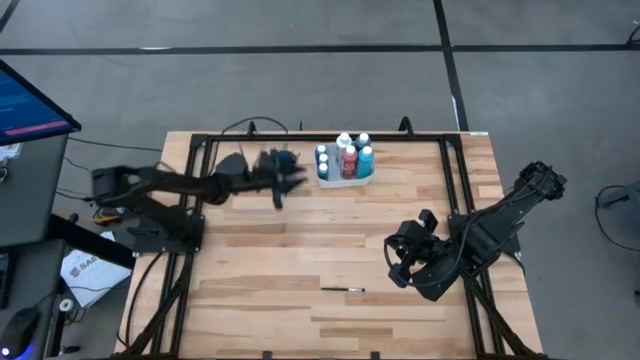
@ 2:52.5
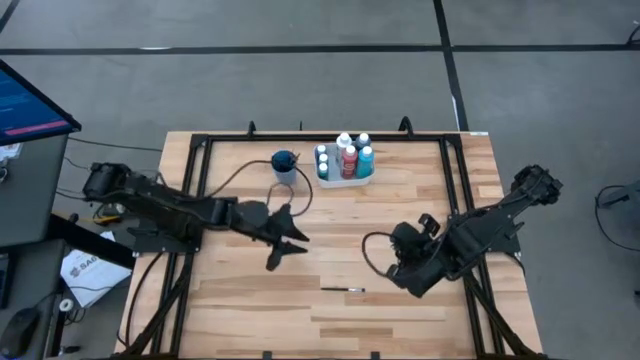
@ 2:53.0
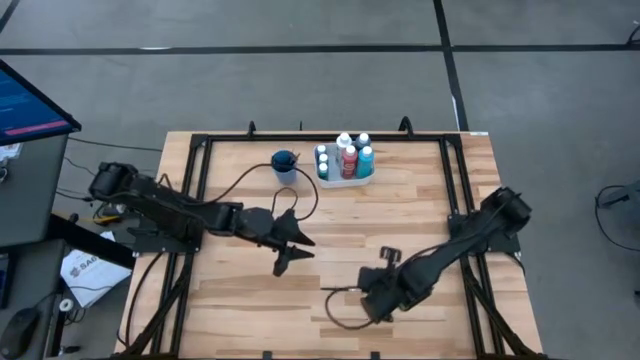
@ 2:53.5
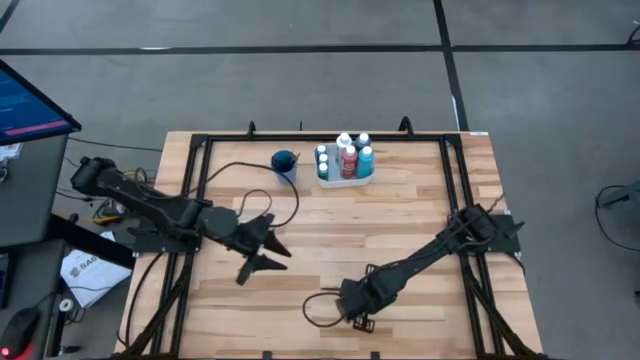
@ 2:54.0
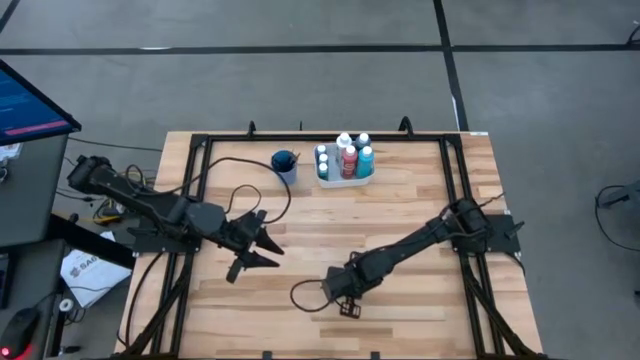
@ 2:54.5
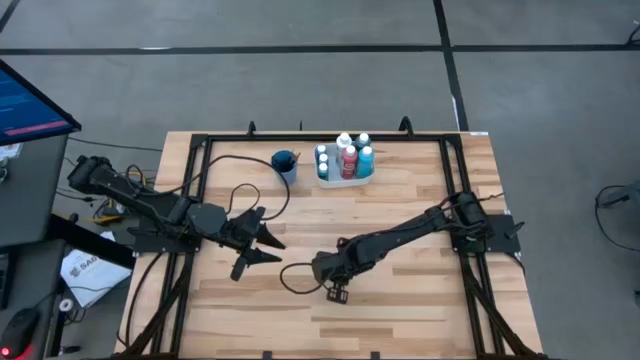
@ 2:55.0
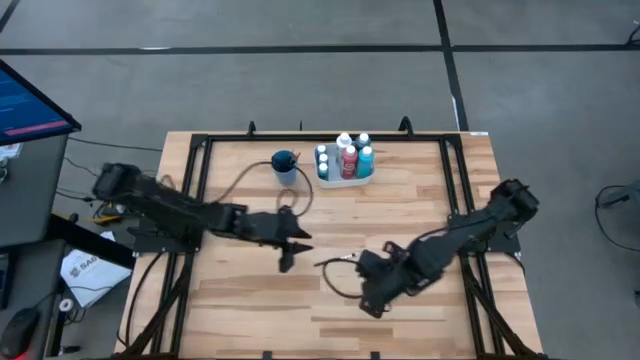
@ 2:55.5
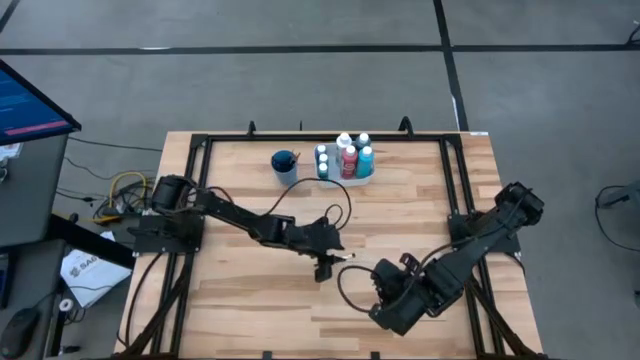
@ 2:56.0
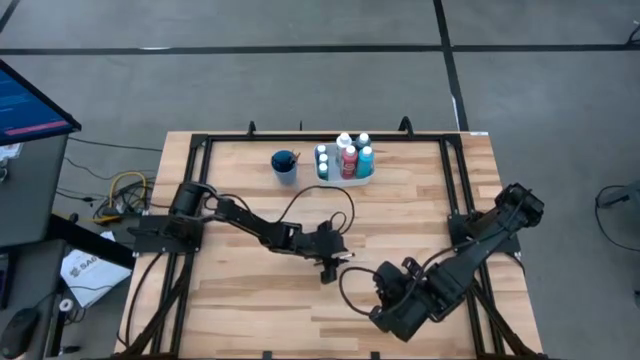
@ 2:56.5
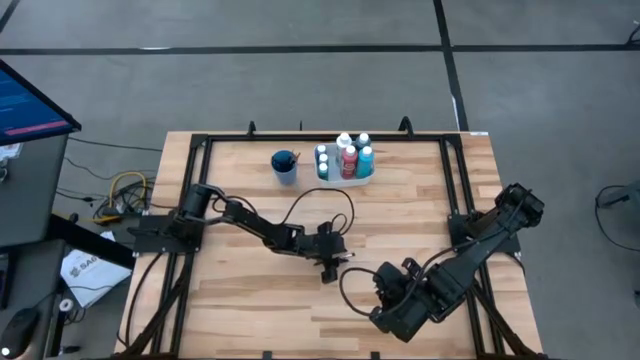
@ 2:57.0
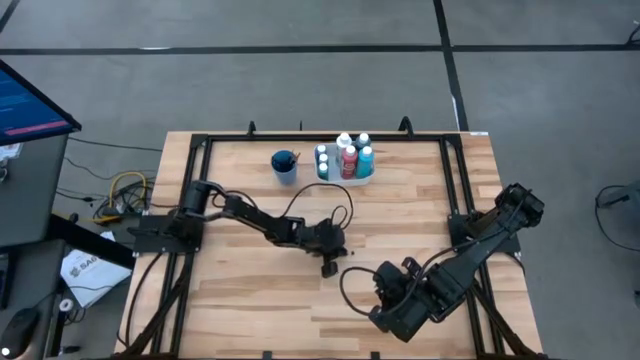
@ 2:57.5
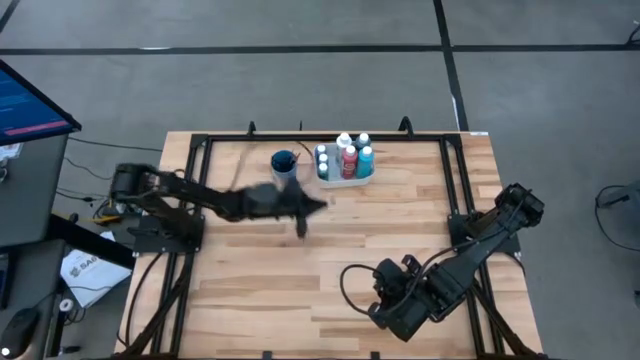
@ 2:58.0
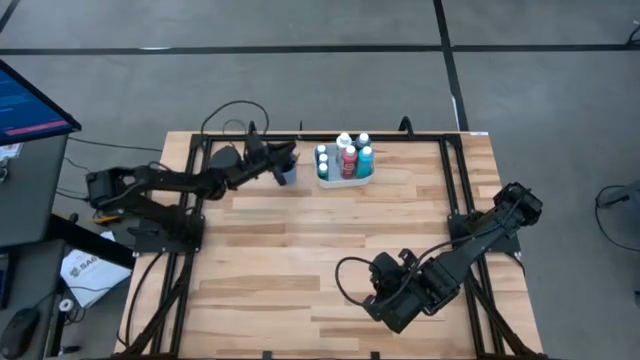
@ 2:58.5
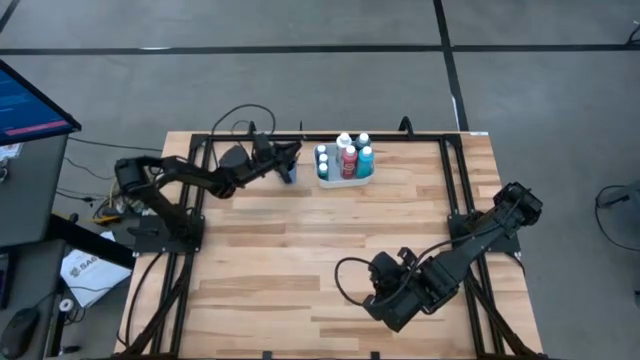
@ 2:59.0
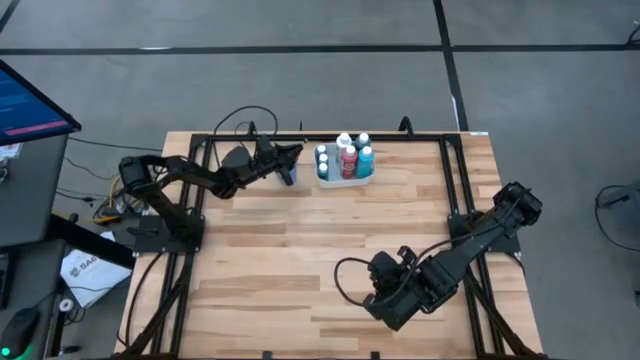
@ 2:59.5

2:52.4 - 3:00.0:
Task: Pick & Place Paint Supplies
Put the silver and black paint brush into the blue cup

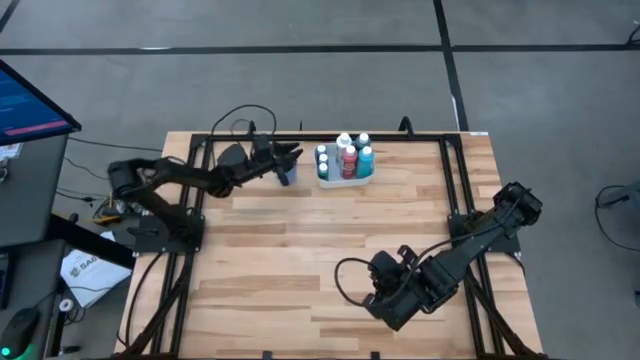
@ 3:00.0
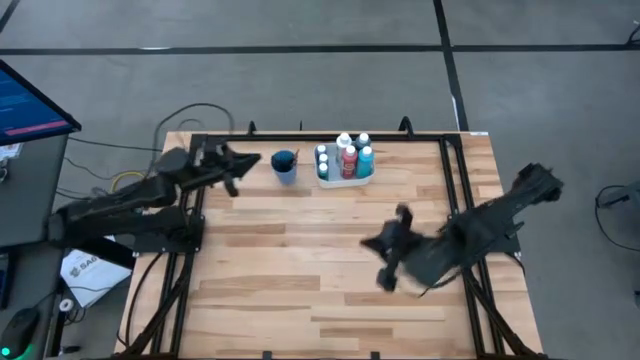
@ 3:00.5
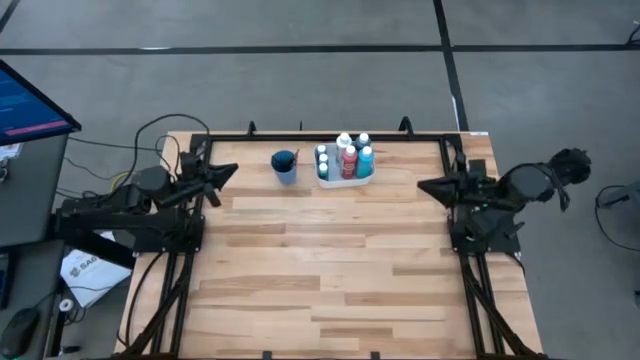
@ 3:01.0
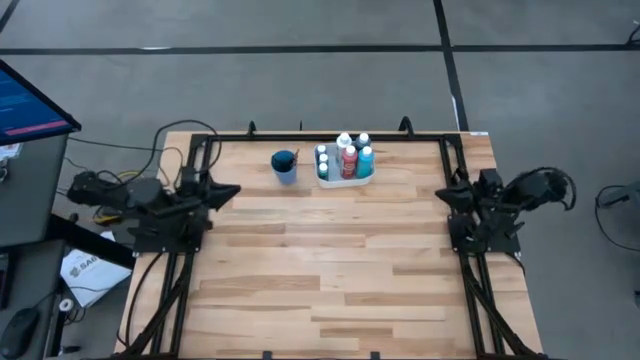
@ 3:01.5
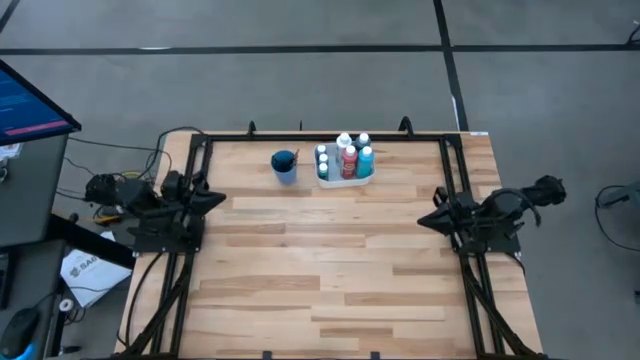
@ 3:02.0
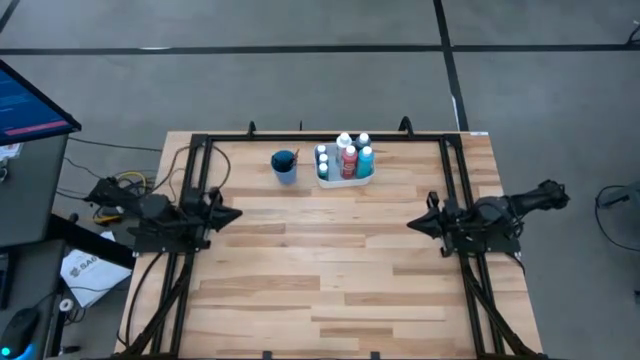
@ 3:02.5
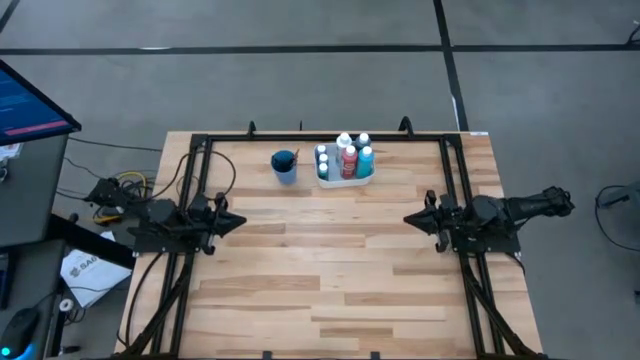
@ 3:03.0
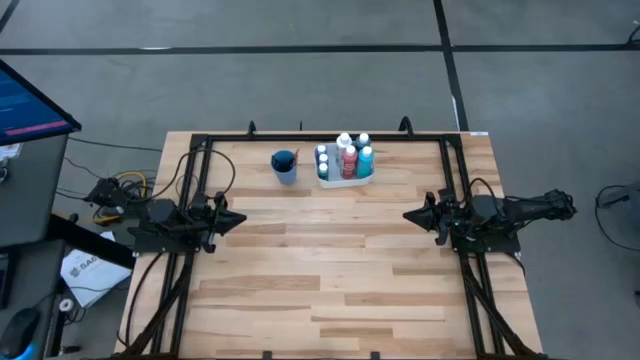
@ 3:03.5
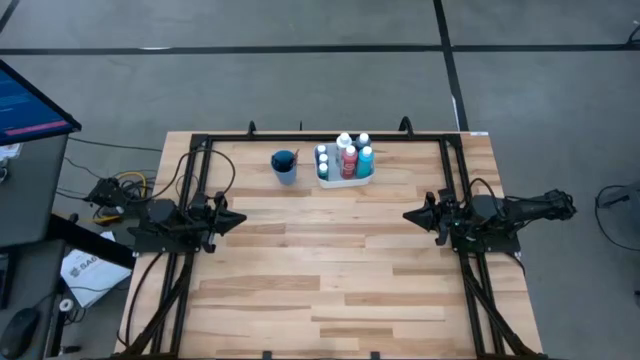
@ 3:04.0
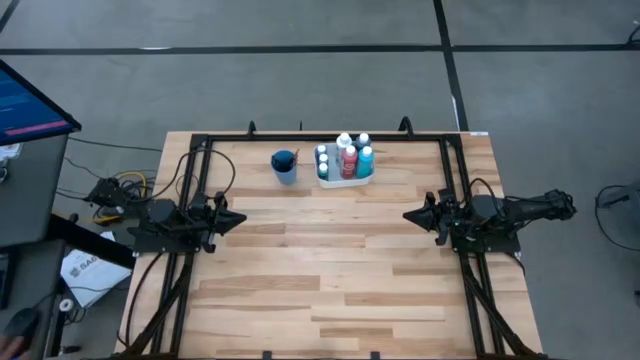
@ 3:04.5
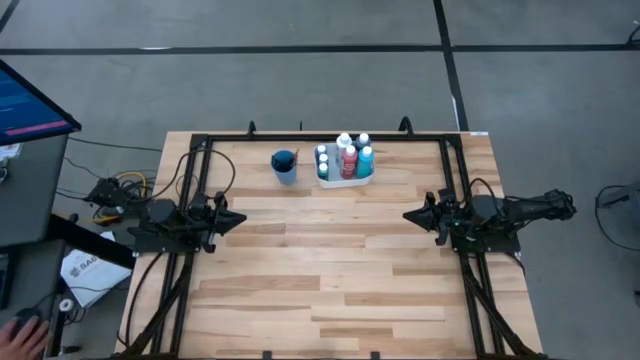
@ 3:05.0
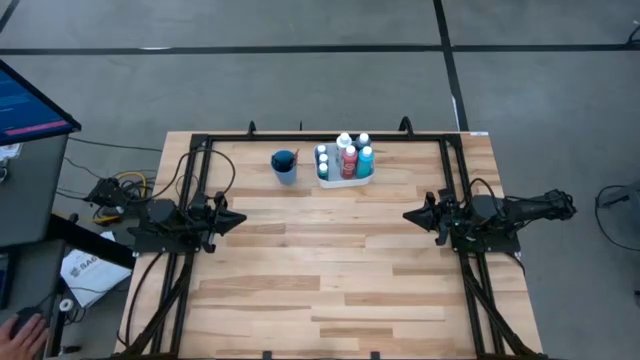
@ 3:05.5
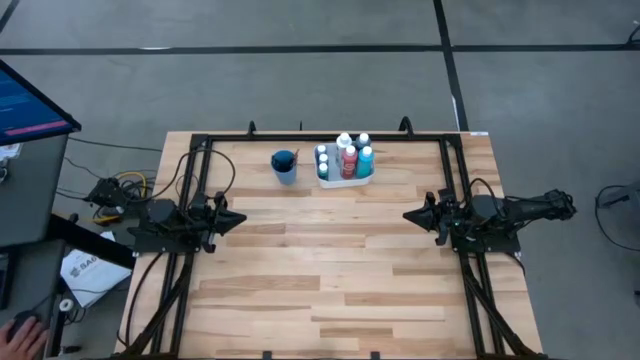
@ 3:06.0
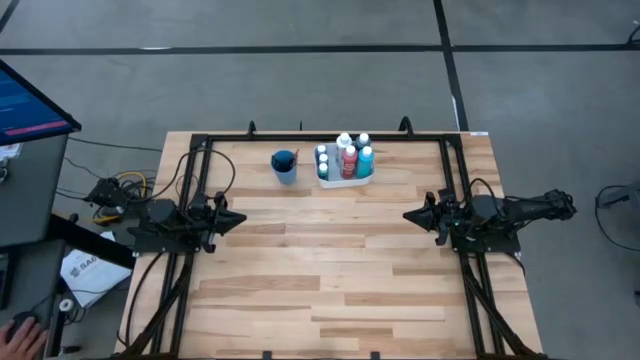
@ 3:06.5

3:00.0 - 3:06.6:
Return to Home Position
